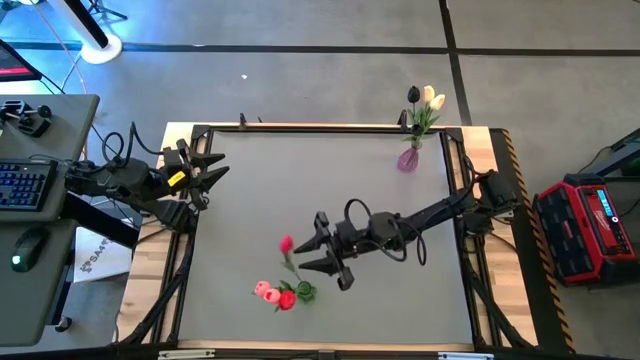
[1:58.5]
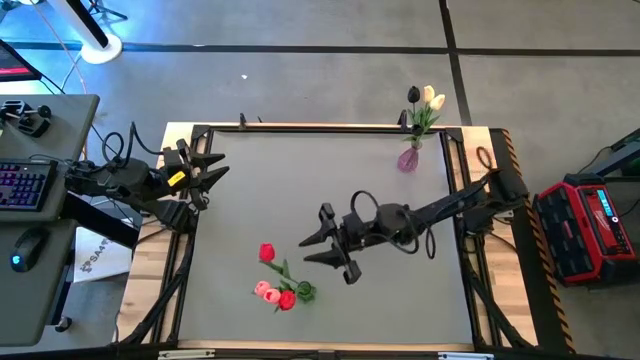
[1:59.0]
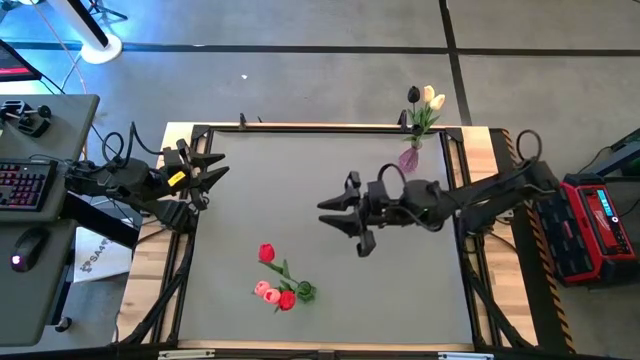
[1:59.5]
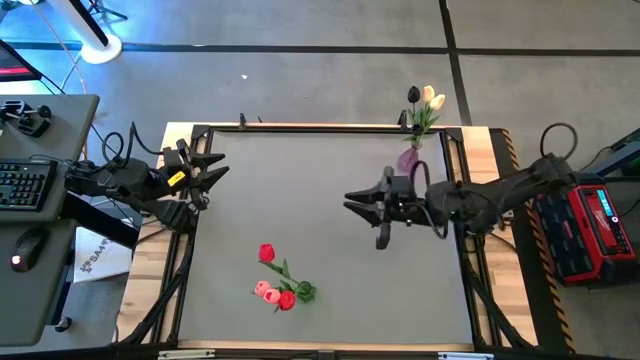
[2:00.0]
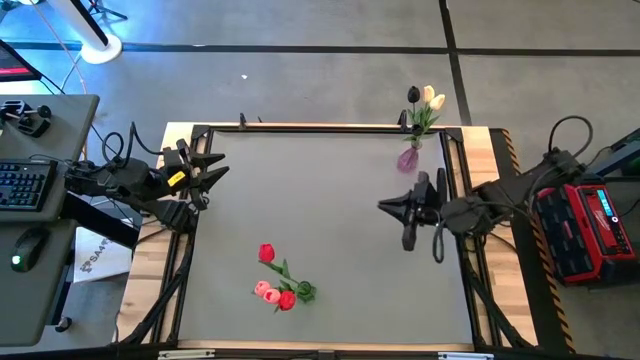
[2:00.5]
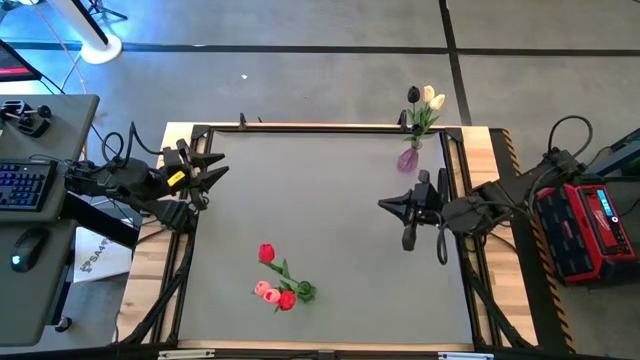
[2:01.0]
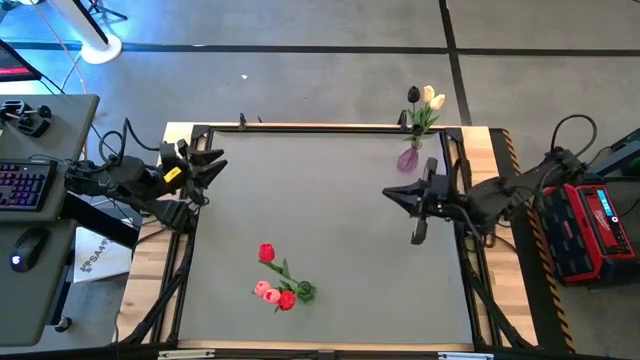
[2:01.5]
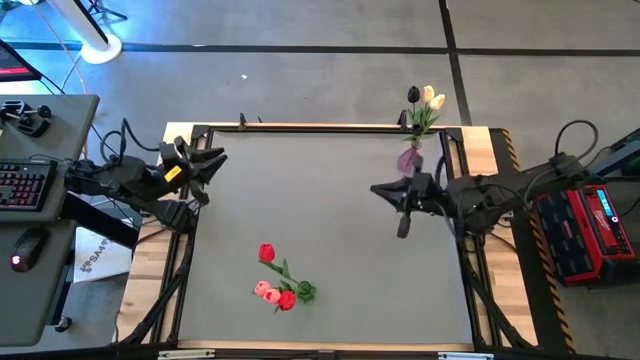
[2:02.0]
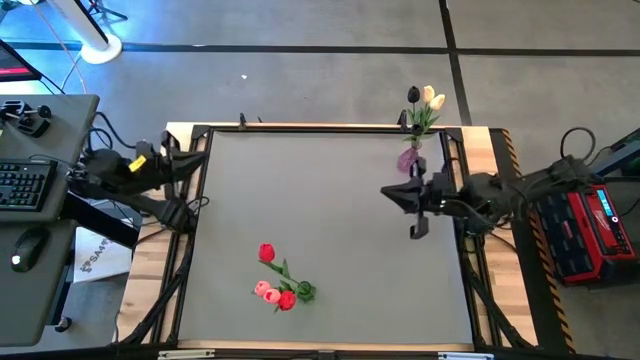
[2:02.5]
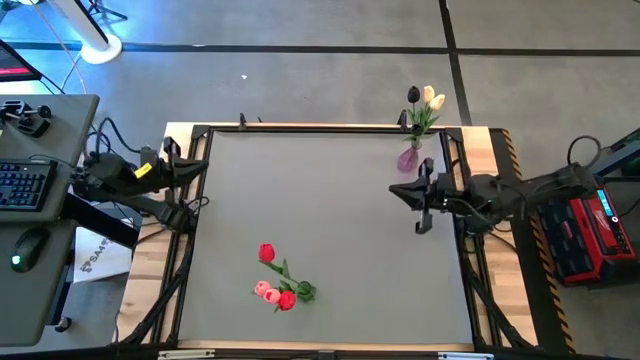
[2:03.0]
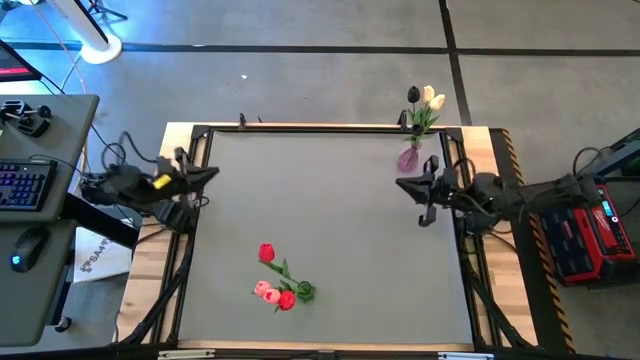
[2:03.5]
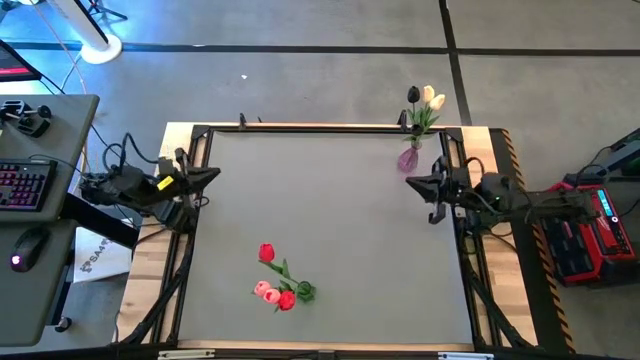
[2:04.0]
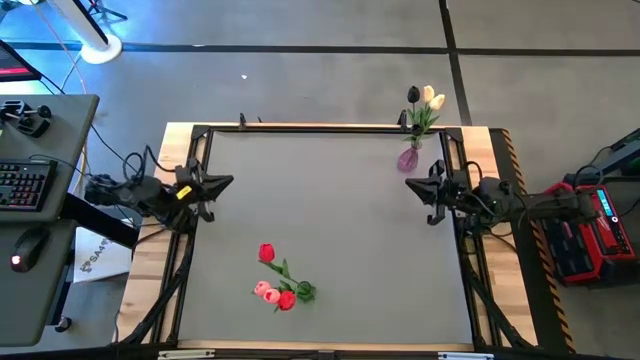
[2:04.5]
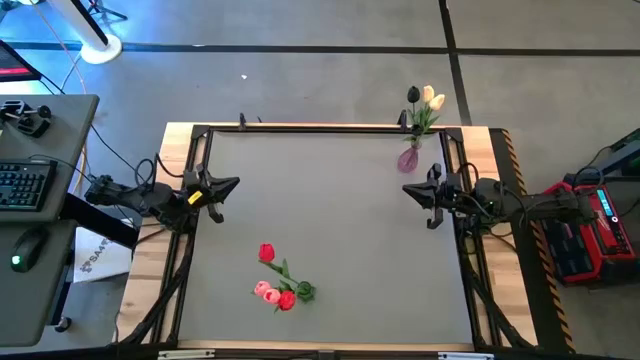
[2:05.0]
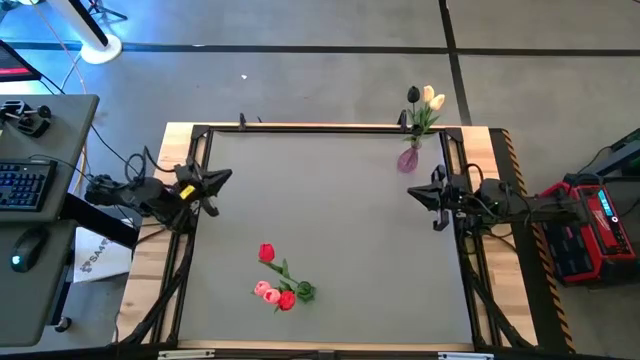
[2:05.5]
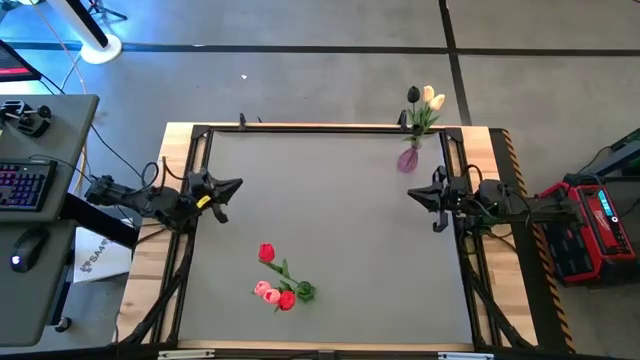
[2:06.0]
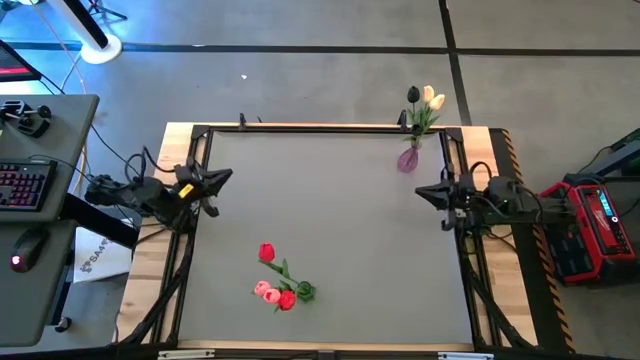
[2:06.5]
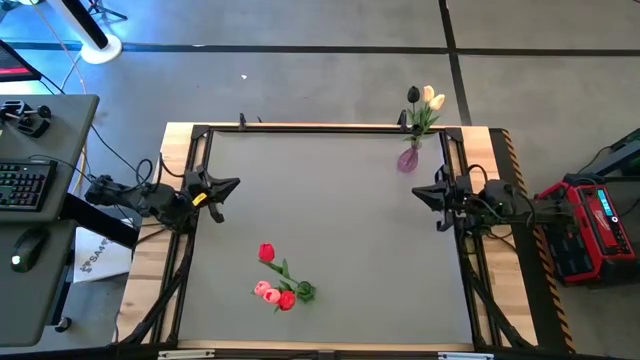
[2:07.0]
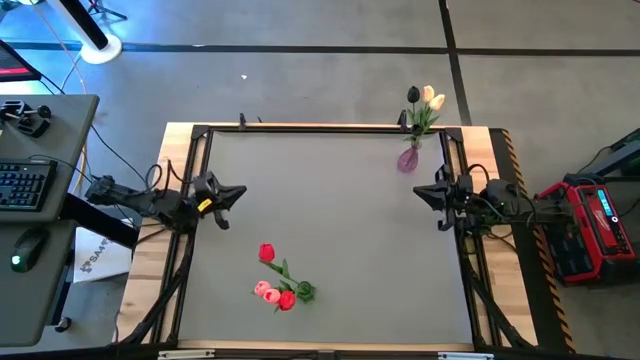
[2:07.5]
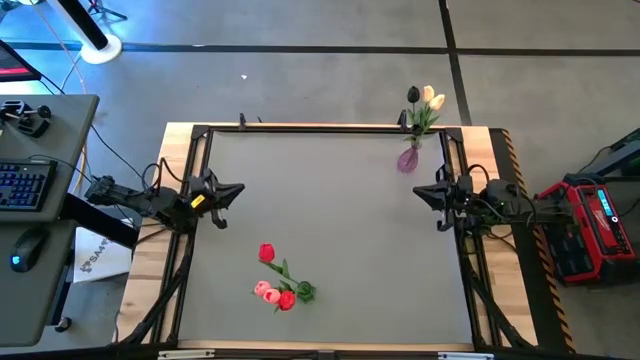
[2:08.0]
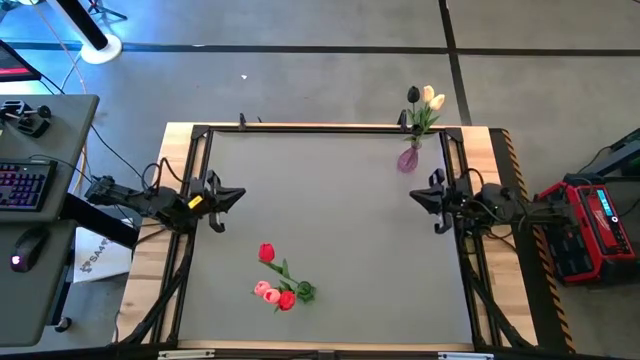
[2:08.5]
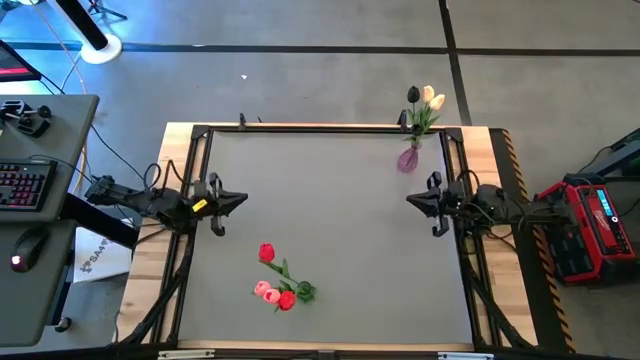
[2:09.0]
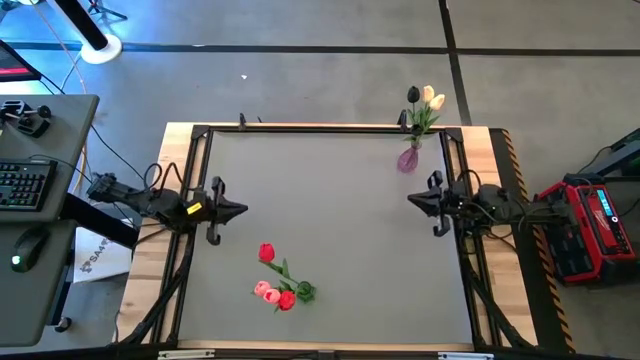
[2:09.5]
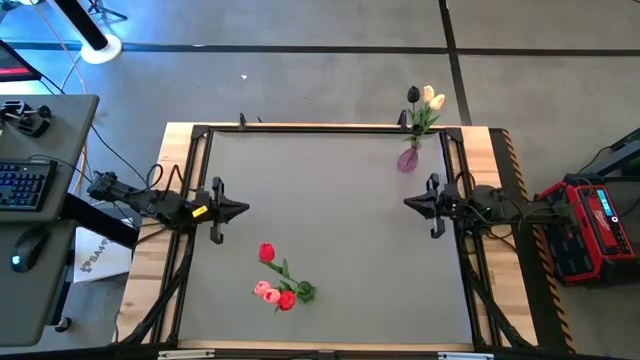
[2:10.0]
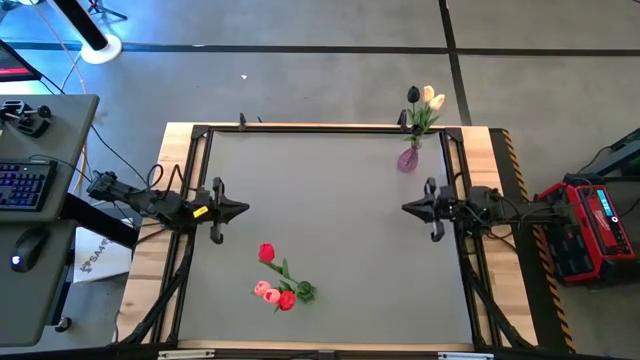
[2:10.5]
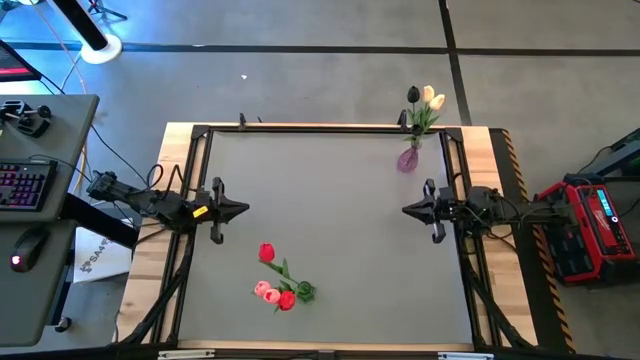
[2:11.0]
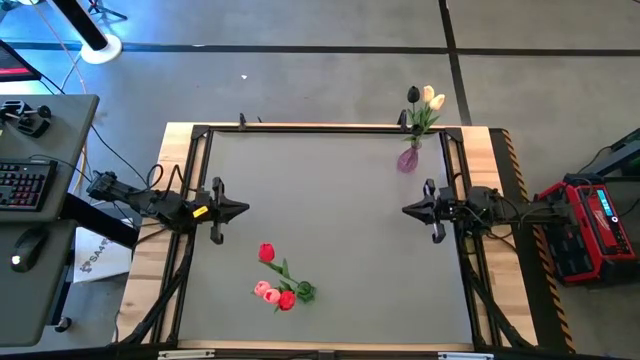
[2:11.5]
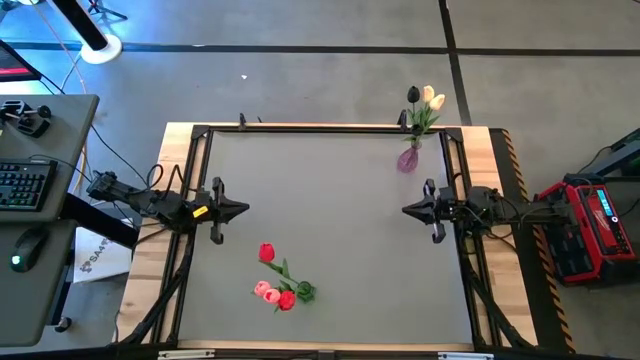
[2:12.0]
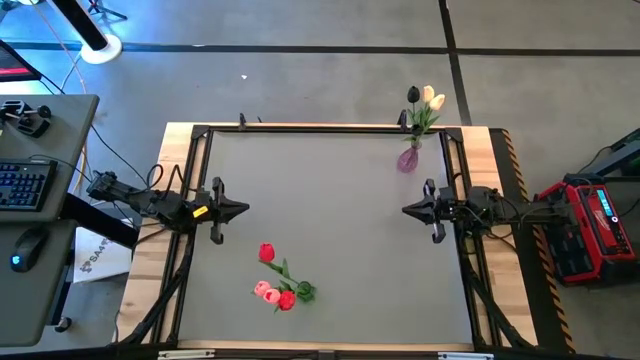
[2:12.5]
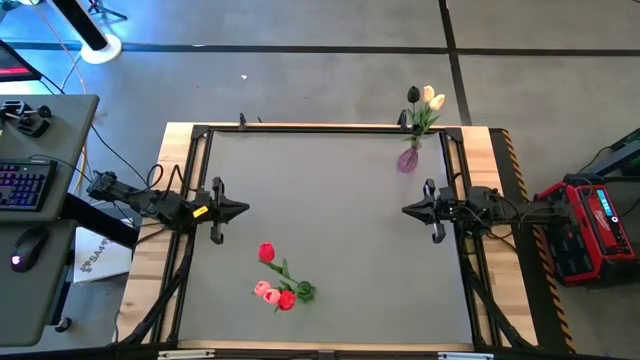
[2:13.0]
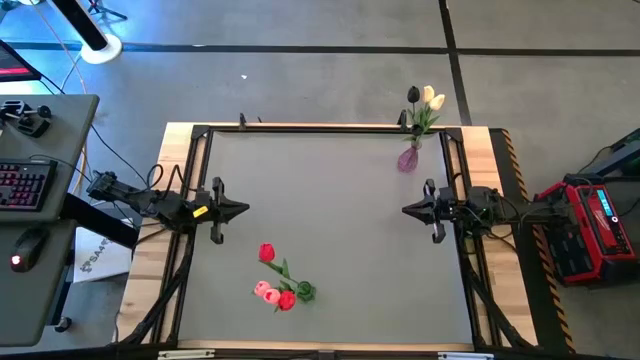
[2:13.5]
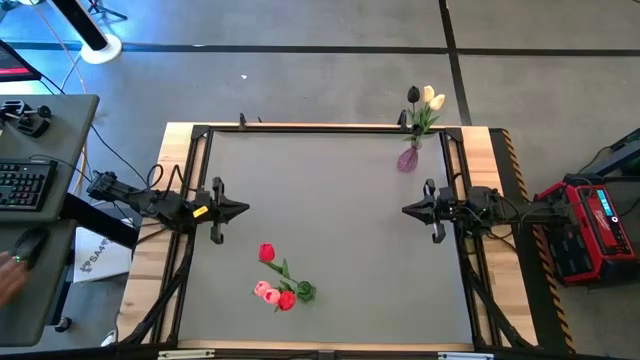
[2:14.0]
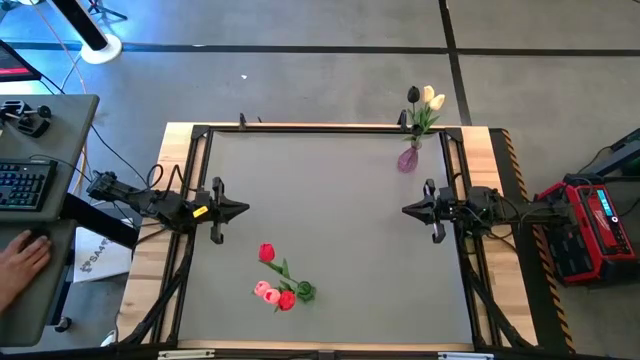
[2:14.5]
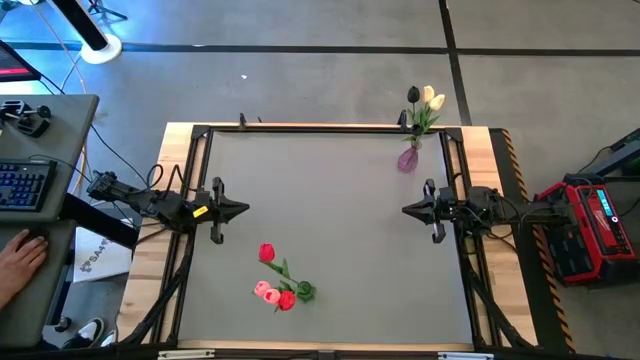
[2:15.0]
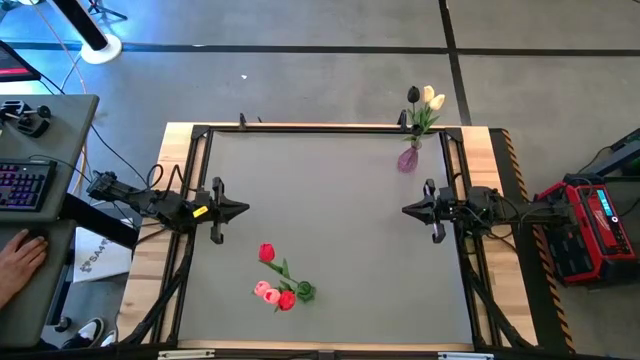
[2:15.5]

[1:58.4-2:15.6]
Task: Sort flowers into vase by color
Return to Home Position
